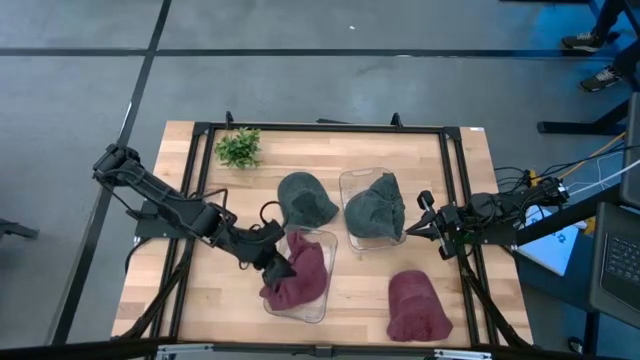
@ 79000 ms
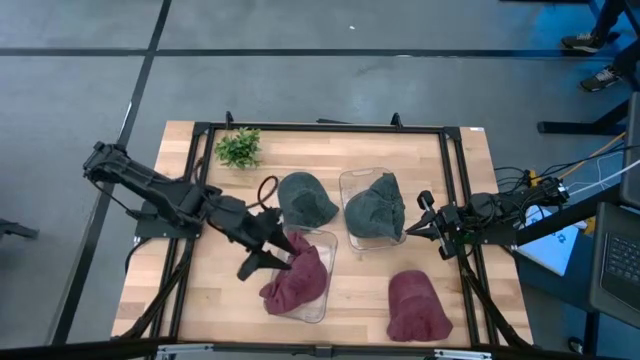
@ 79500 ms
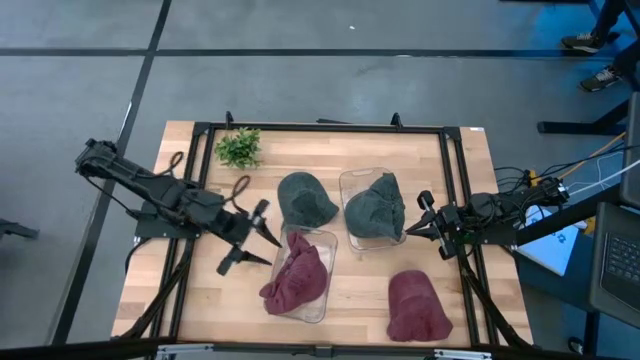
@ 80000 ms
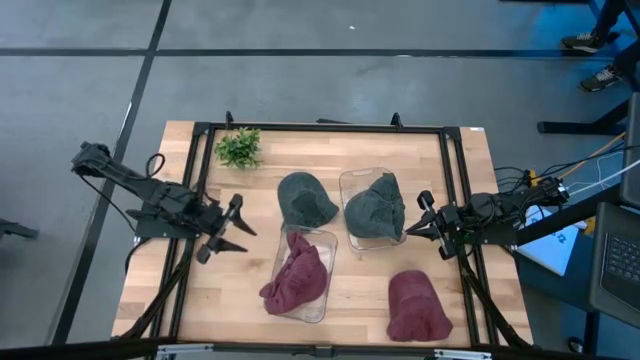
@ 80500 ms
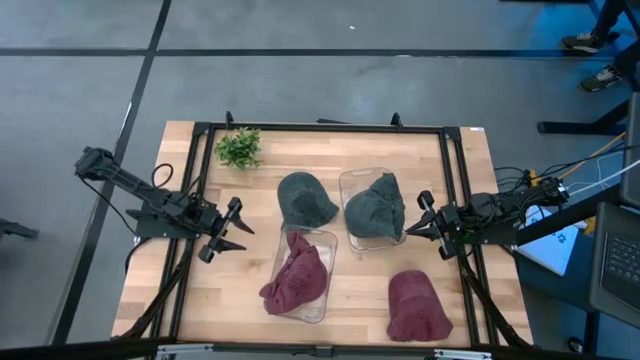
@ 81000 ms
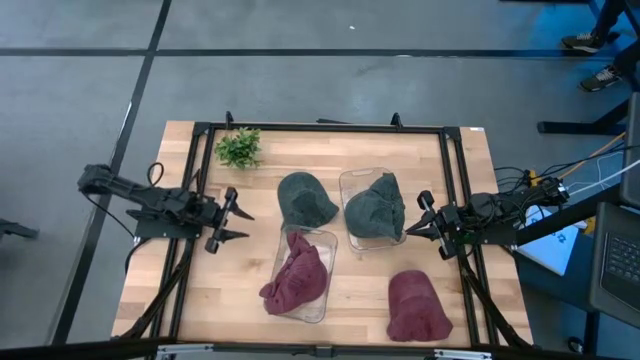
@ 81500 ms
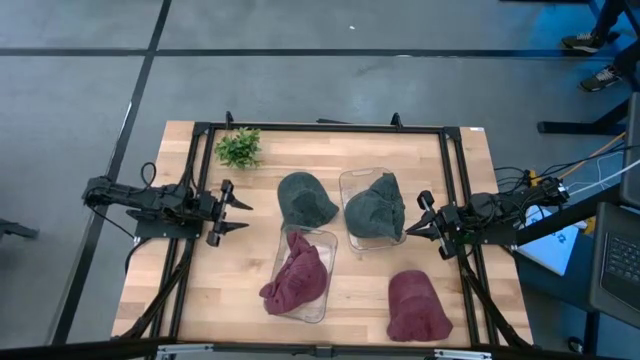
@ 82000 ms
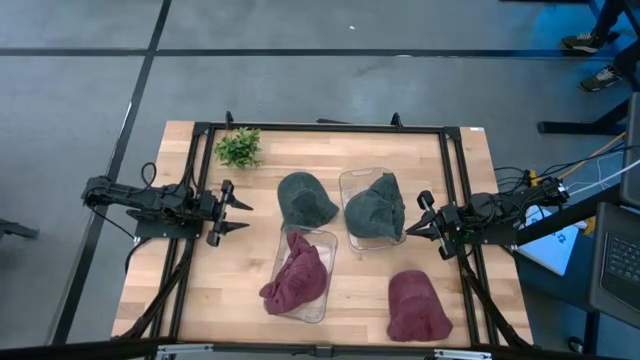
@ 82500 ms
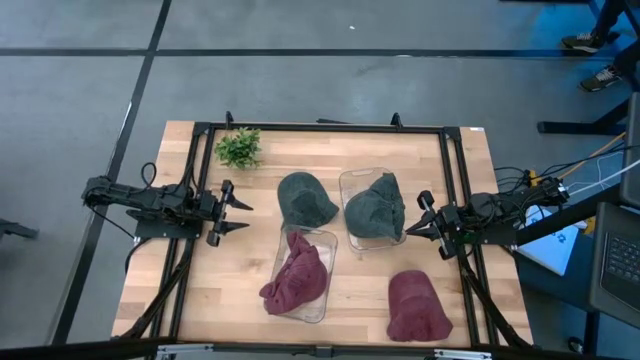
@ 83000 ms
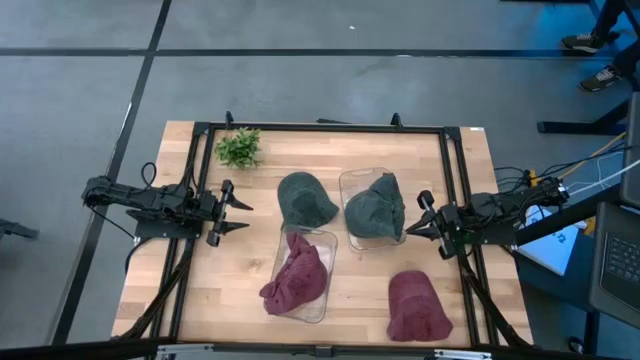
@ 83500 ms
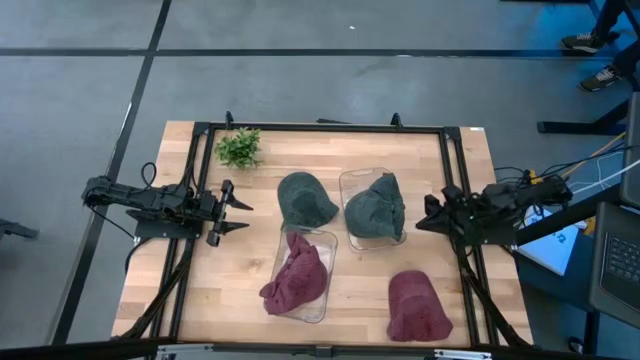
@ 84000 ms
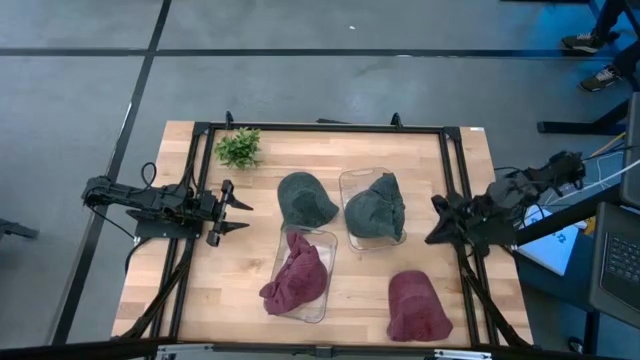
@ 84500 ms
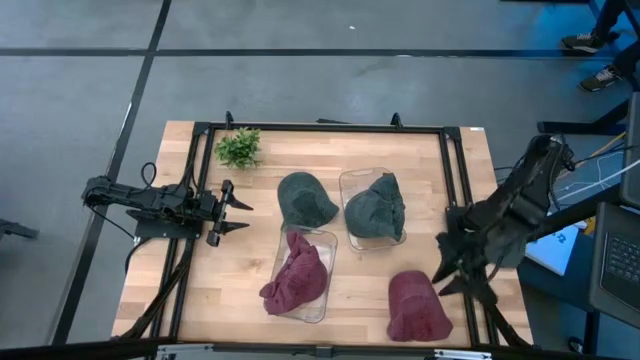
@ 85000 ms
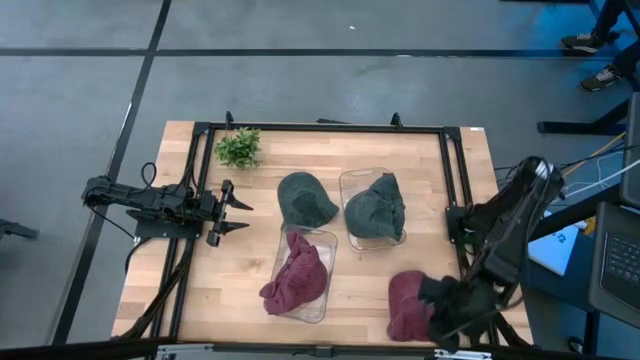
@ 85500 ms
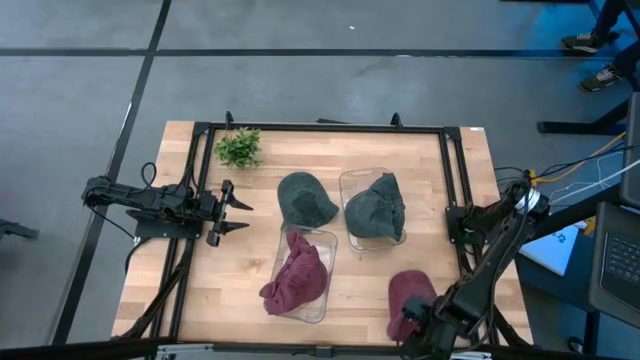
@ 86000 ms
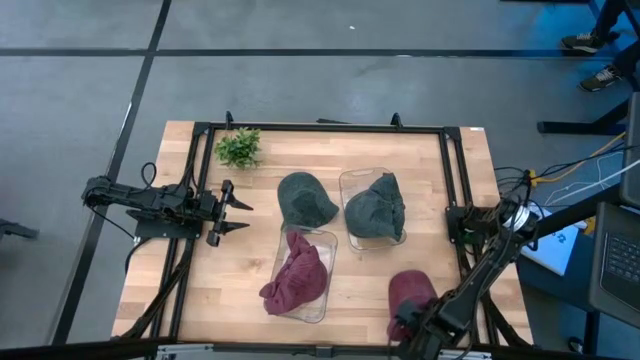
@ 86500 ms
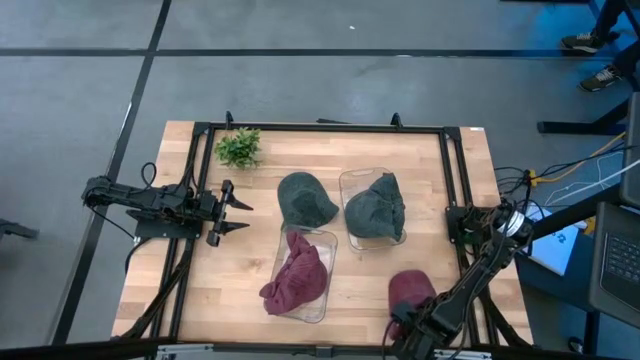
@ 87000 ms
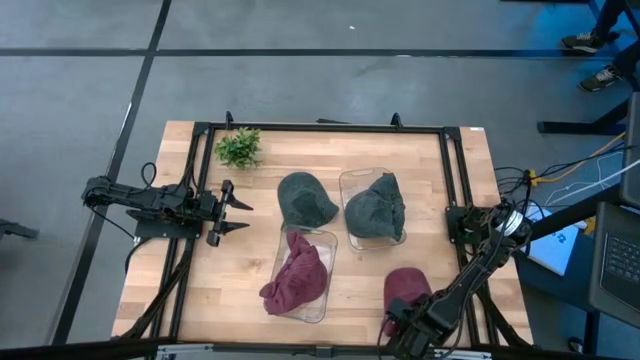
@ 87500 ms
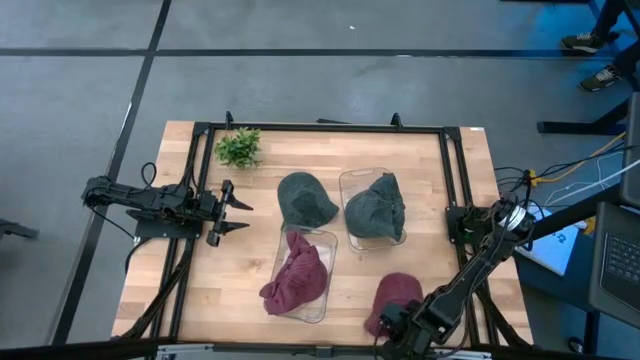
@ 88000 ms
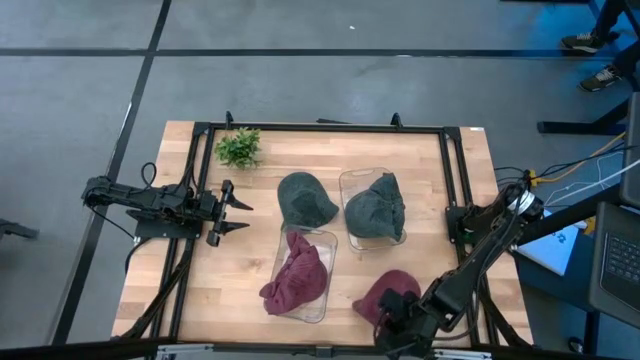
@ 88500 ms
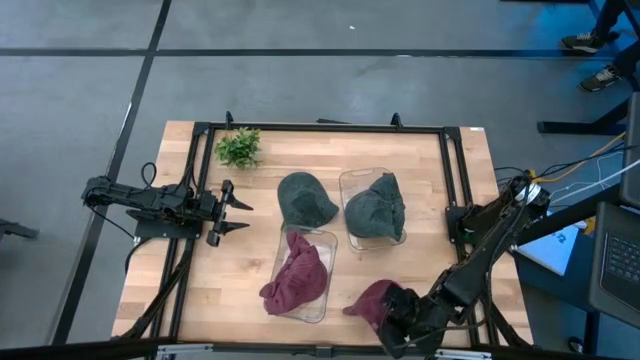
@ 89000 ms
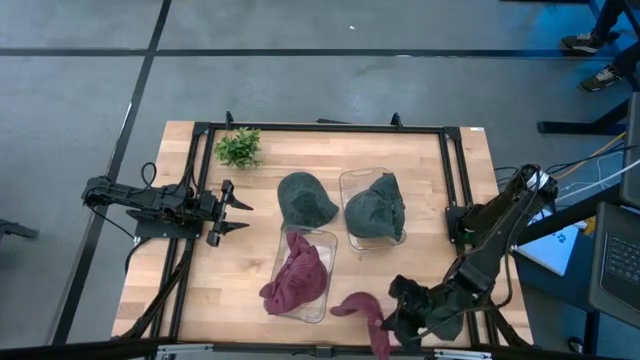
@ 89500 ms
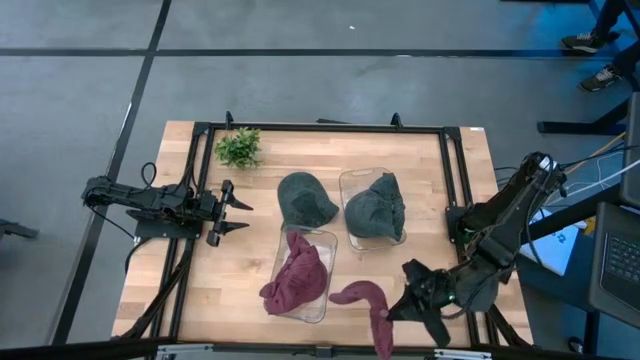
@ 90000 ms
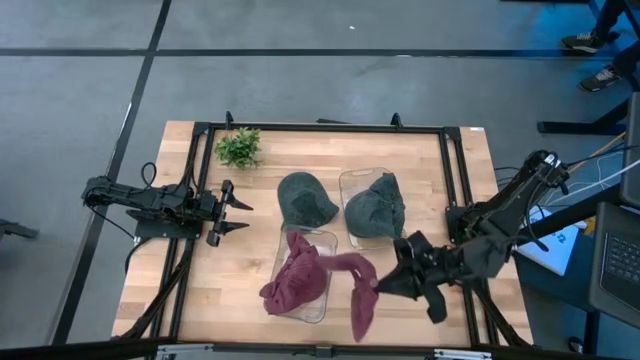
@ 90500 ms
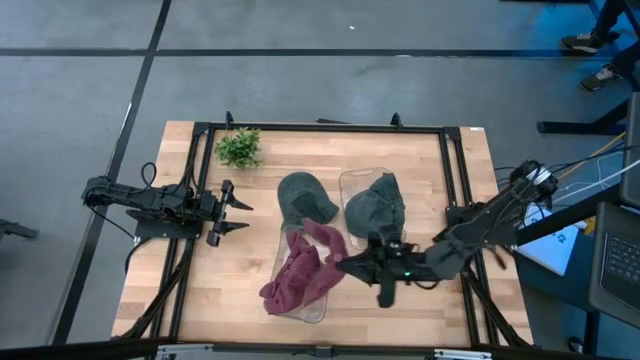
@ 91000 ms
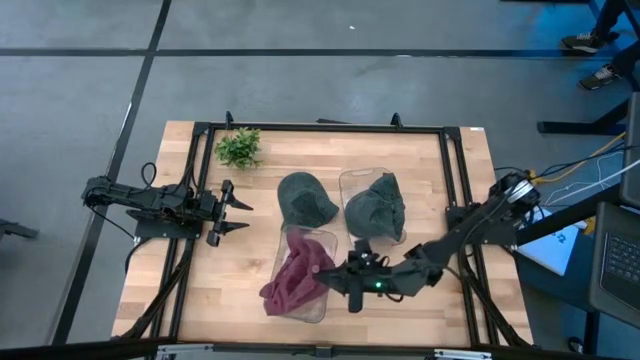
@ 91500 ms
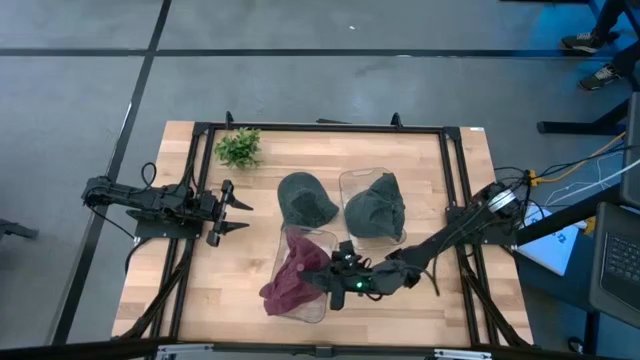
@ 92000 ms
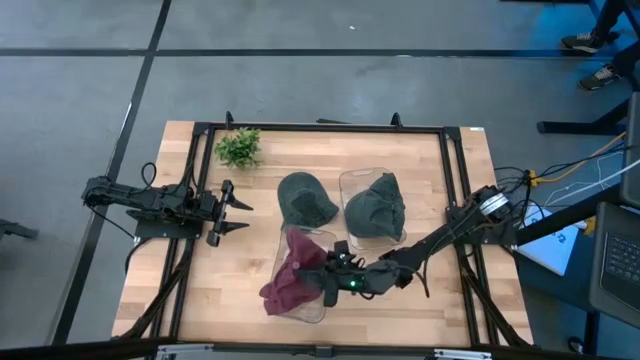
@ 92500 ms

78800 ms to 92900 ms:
Task: Pick & Place hat
Put the red cap into the left transparent bin

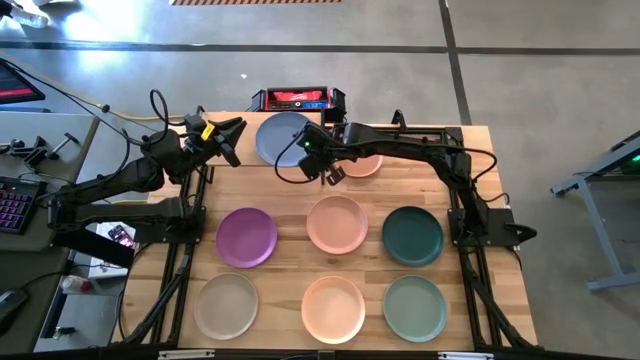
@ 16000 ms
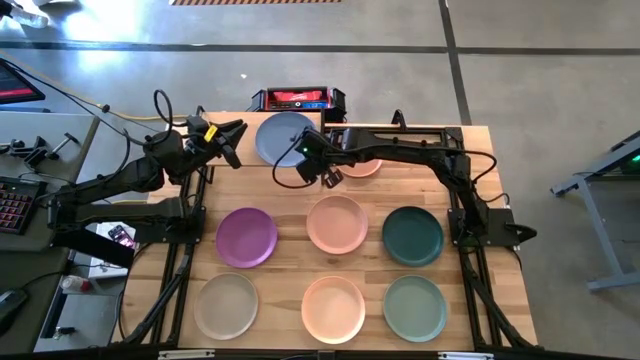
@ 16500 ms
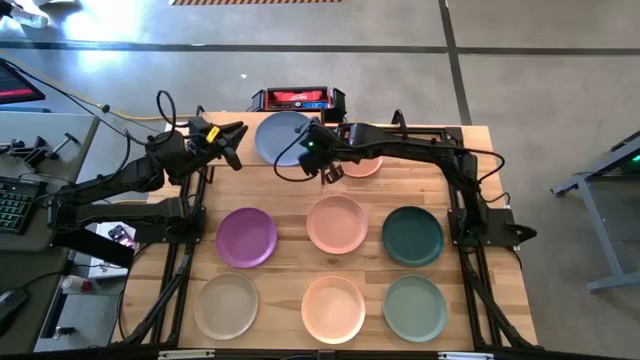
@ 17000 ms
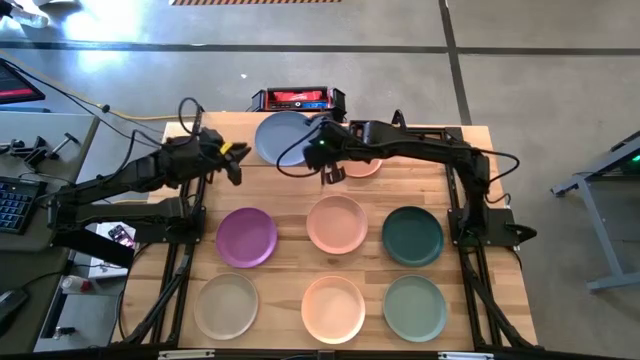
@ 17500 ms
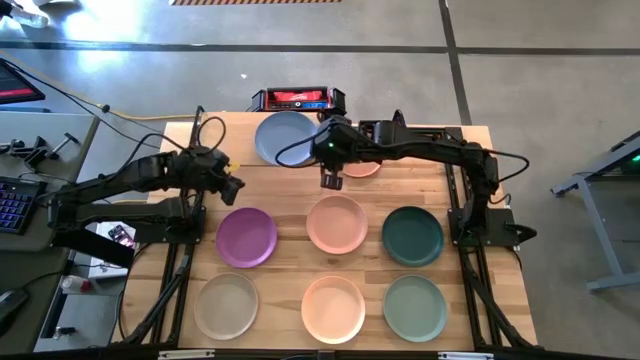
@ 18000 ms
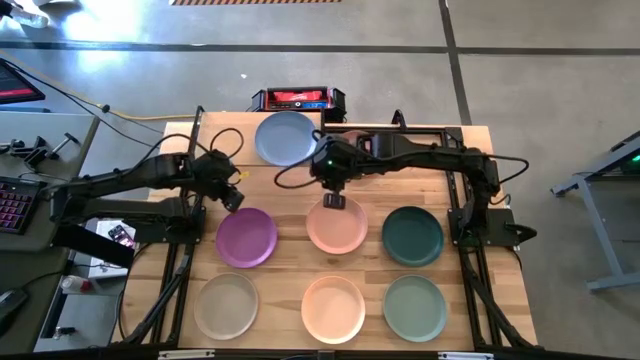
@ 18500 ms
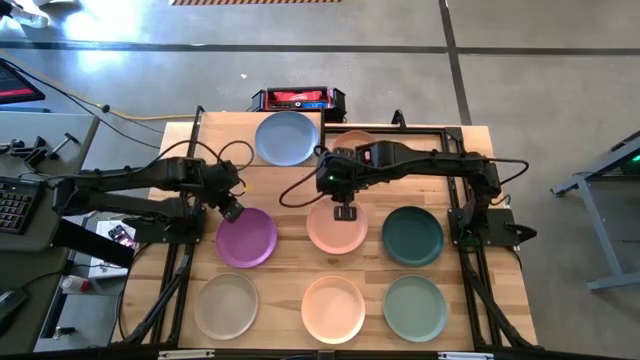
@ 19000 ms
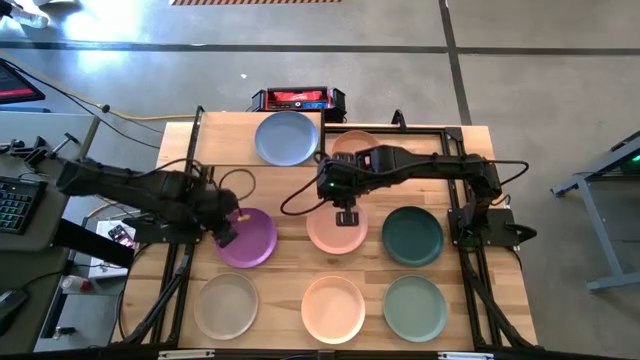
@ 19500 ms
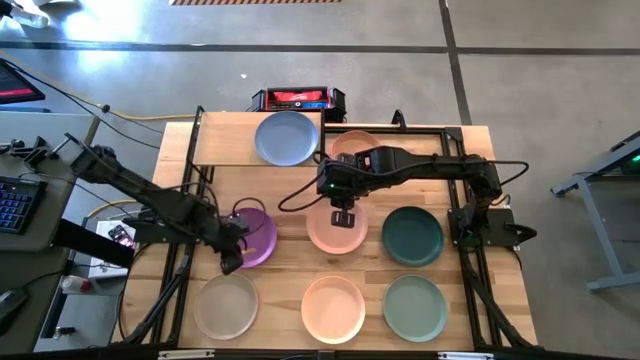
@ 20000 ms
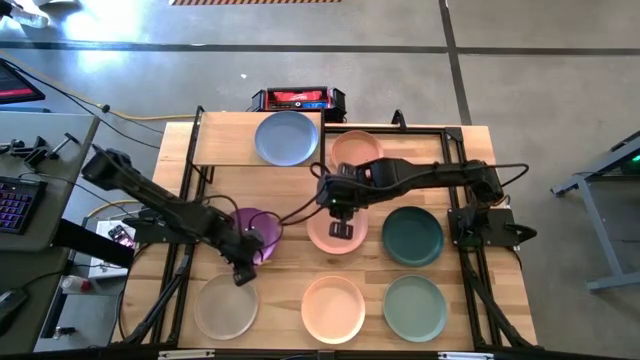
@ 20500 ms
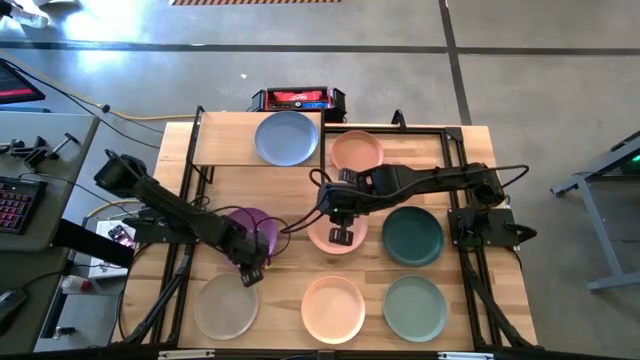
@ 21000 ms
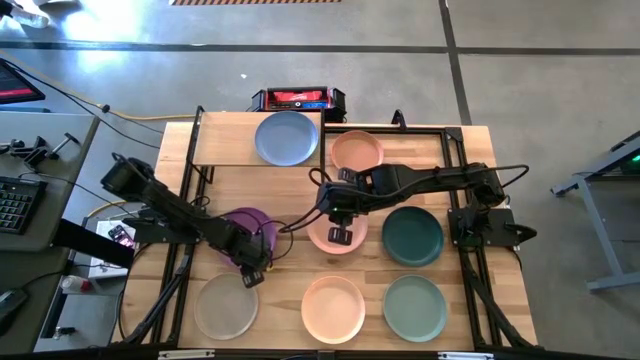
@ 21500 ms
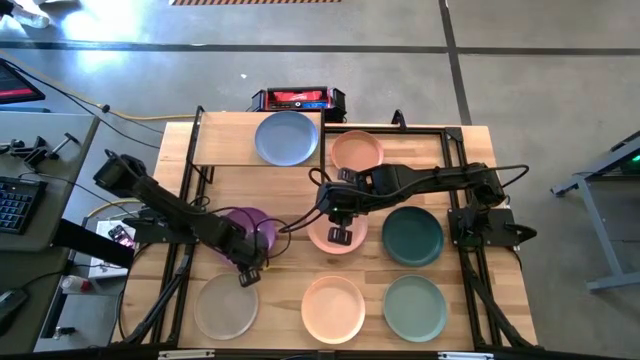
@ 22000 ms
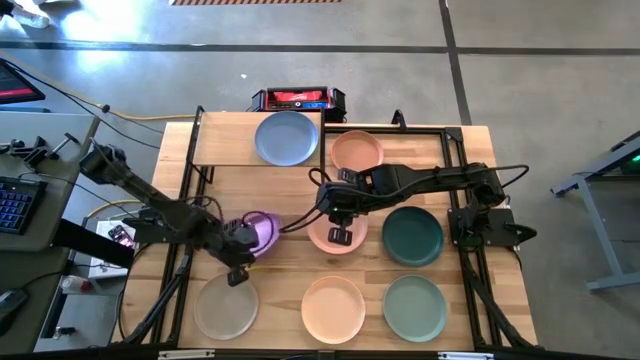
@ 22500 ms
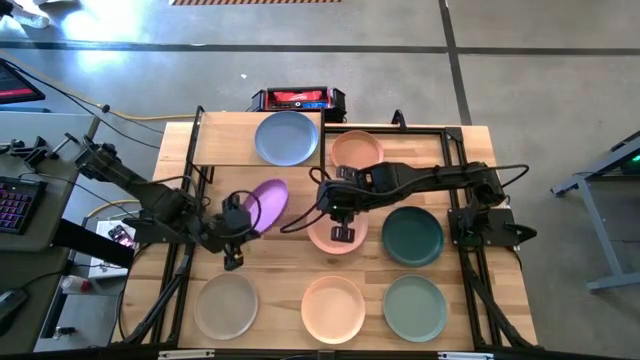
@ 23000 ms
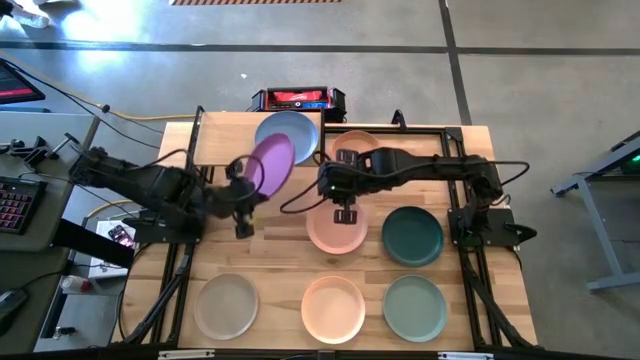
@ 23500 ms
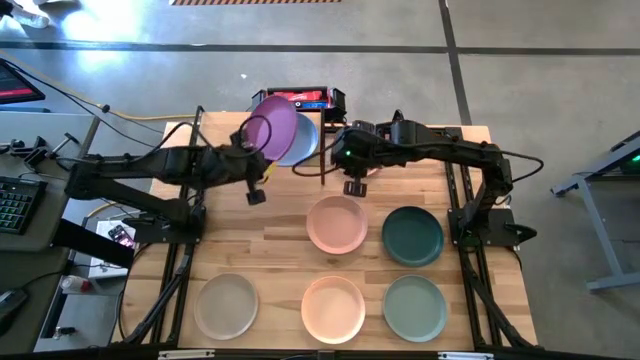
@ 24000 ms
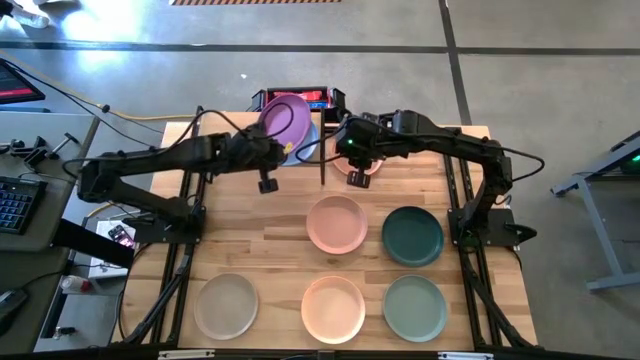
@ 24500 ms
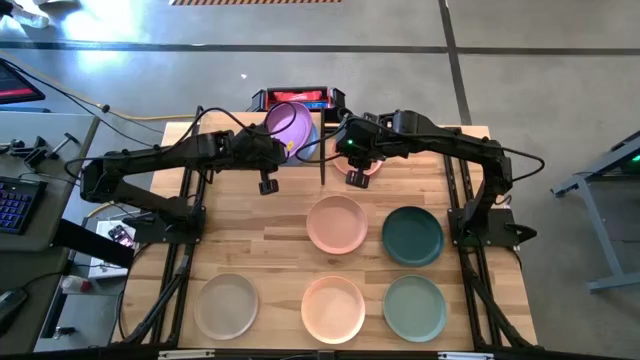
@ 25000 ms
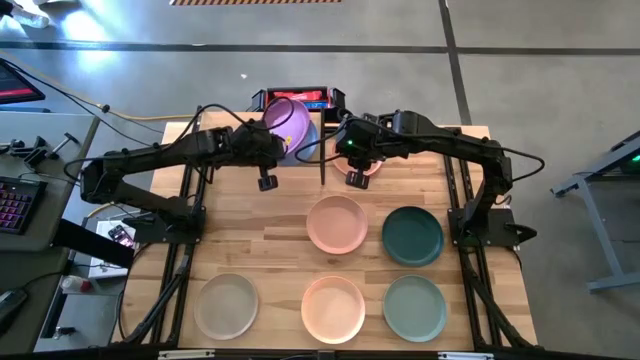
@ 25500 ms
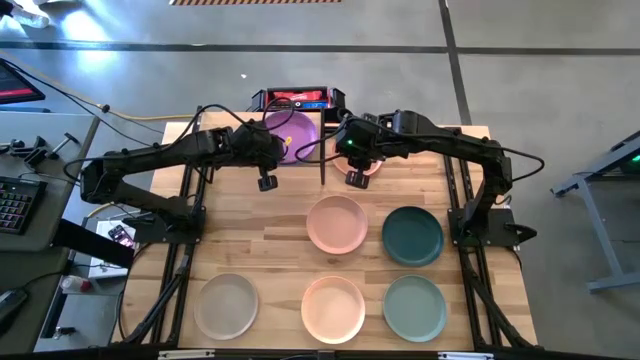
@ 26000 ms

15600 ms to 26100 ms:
Task: Place and stack plates onto a shelf
Stack the purple plate on top of the the light blue plate on the shelf
